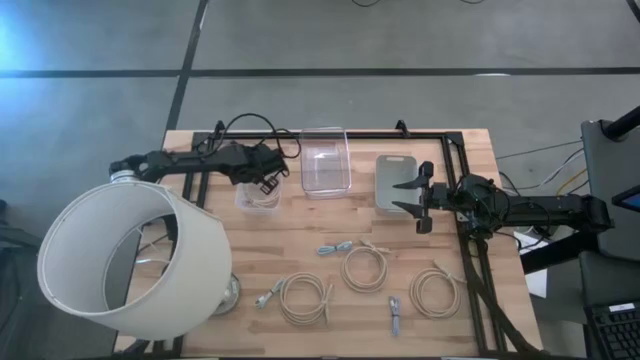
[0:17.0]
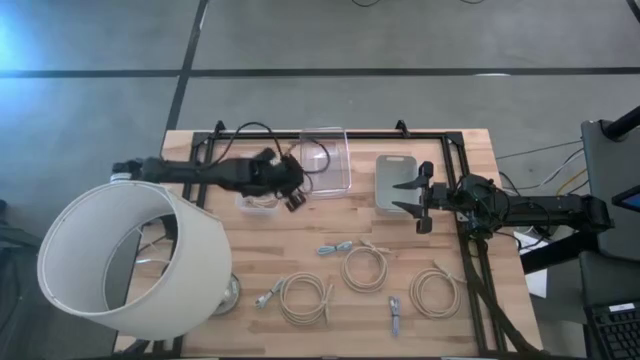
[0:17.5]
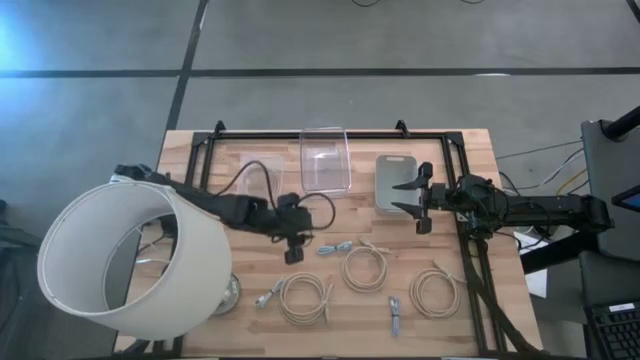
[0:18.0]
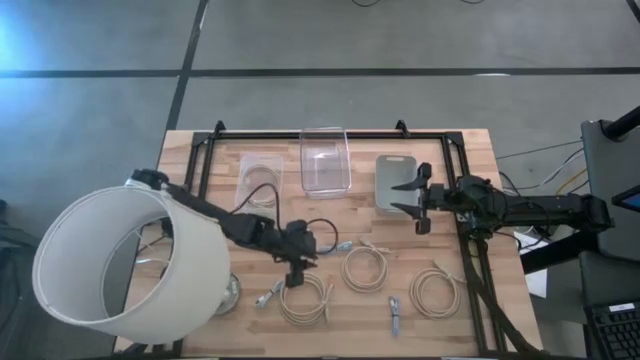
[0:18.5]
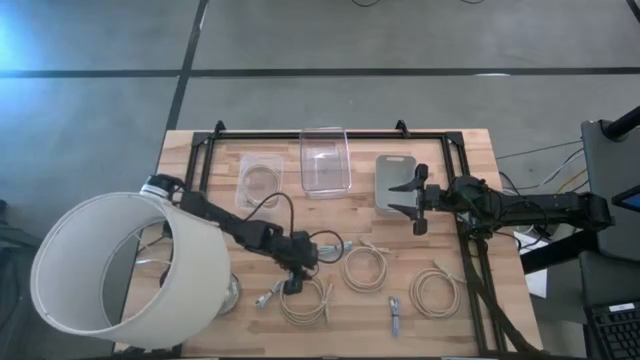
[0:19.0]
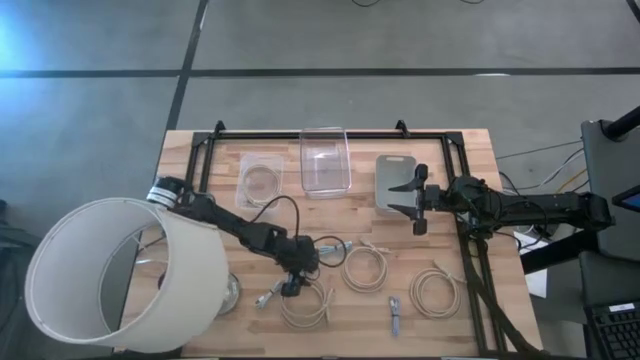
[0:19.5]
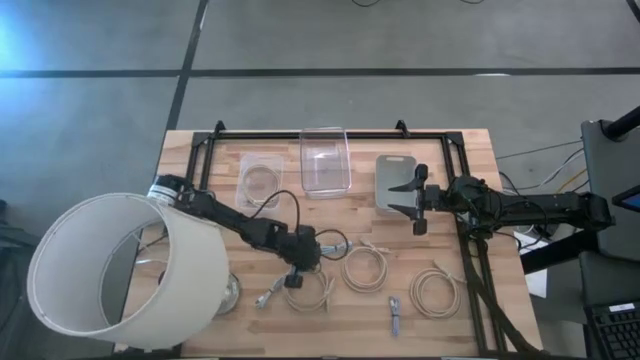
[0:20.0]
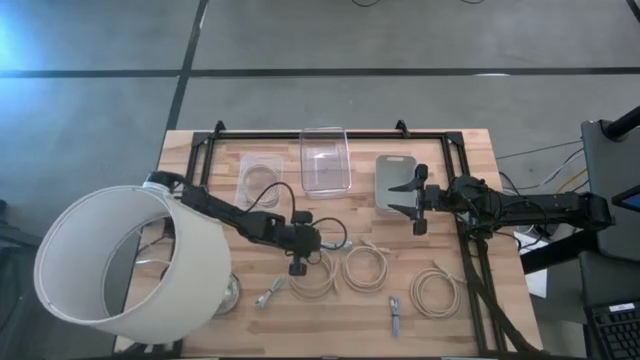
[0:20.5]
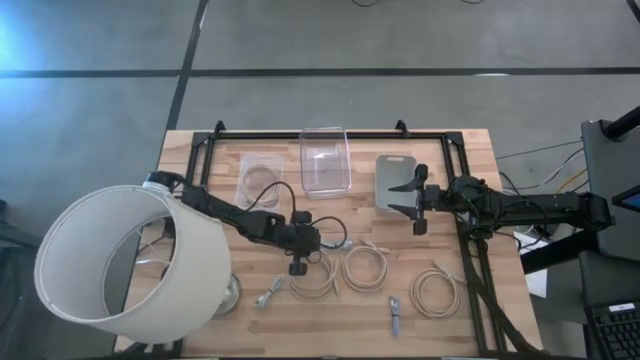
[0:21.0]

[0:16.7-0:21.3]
Task: Pick & Place USB Port
Put the brown USB cable into the white transparent bin

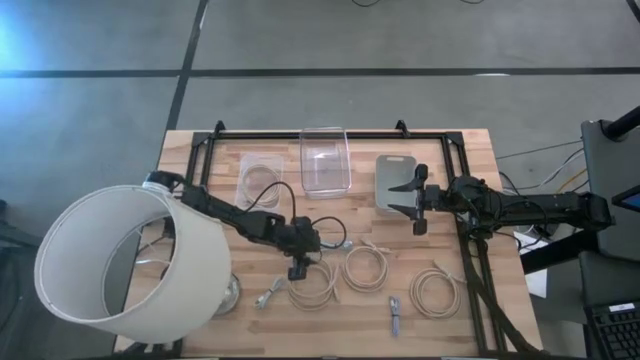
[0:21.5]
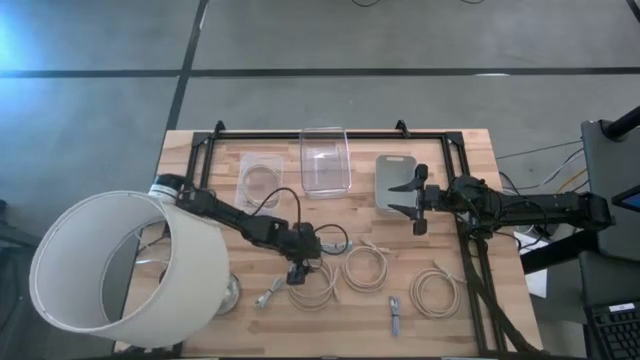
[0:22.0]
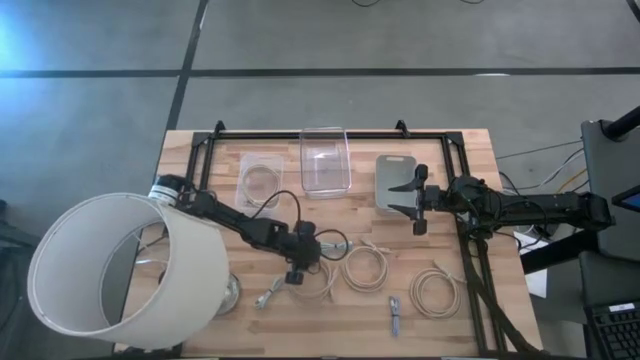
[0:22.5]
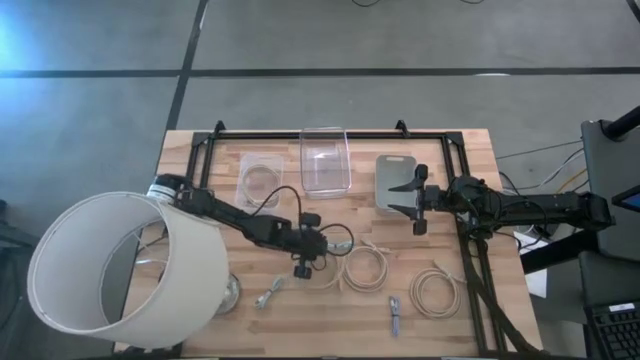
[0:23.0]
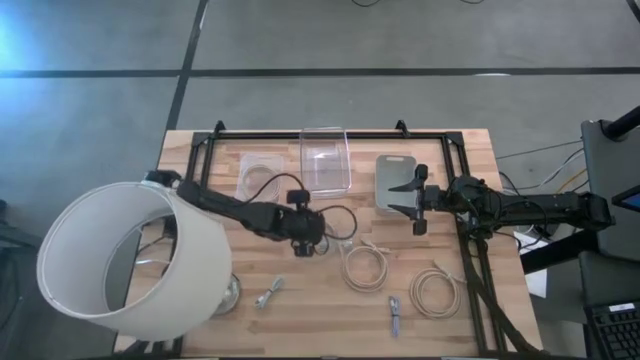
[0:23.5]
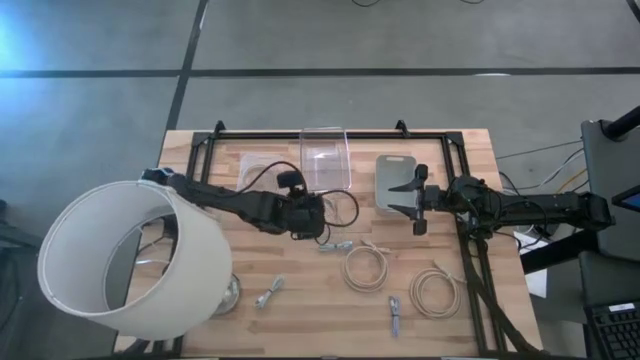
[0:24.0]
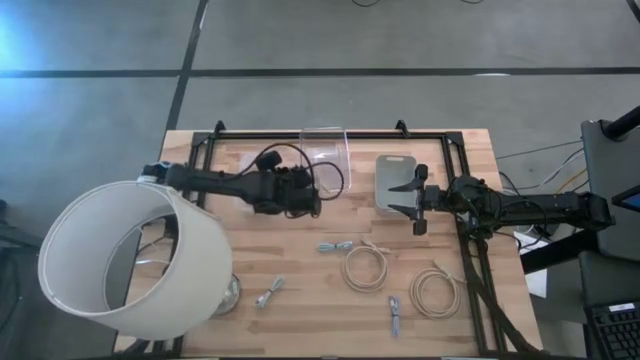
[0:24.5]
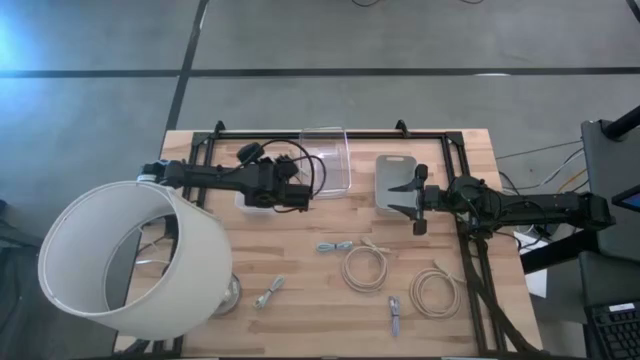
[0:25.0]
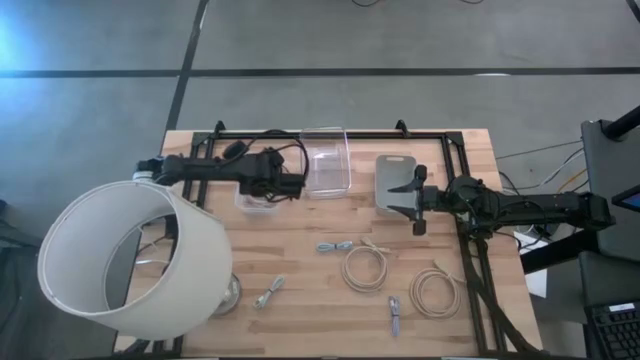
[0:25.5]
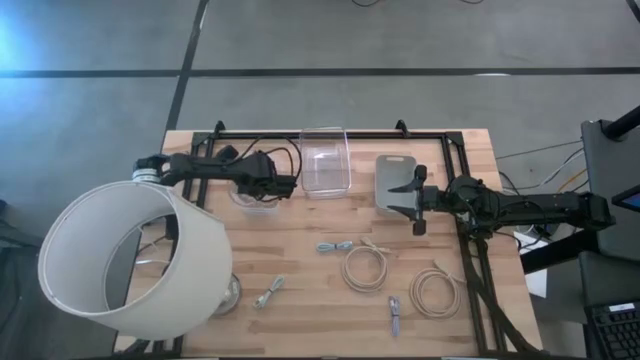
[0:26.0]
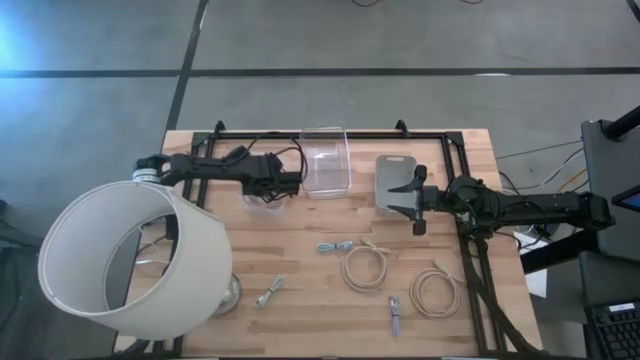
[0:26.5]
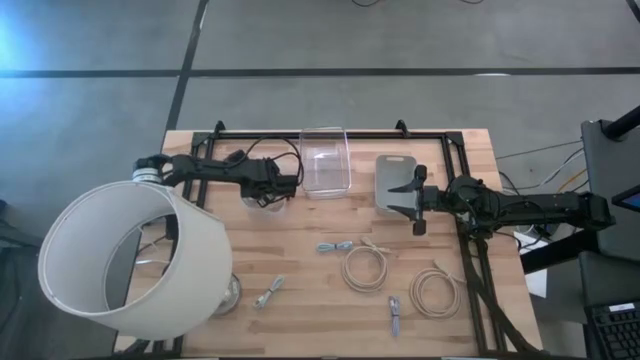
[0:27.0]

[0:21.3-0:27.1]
Put the brown USB cable into the white transparent bin

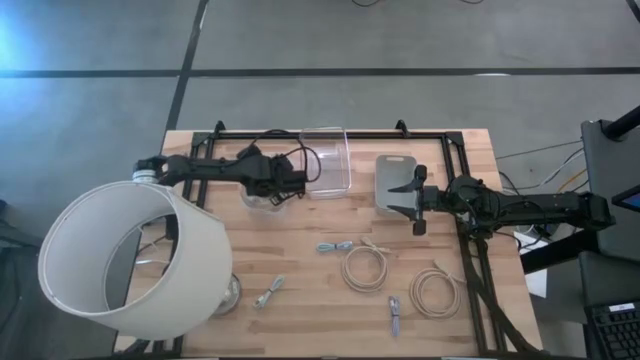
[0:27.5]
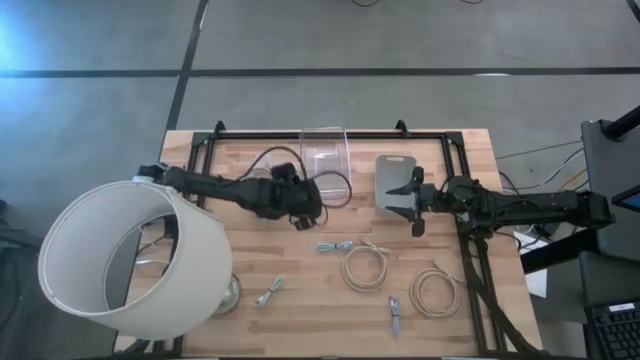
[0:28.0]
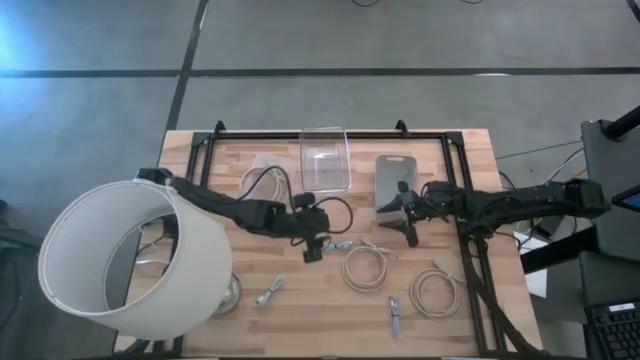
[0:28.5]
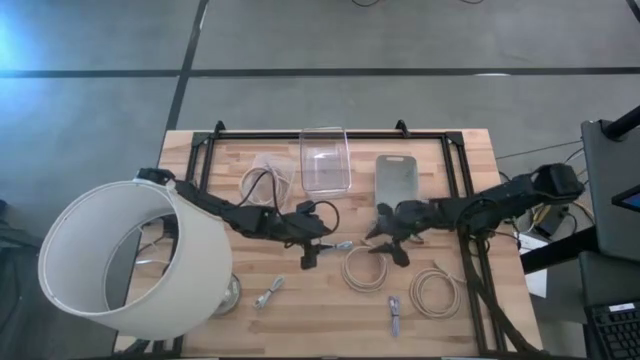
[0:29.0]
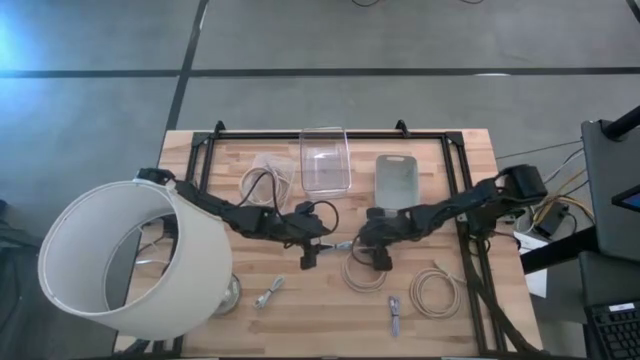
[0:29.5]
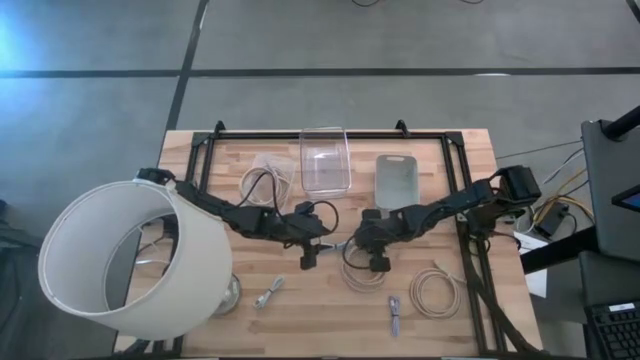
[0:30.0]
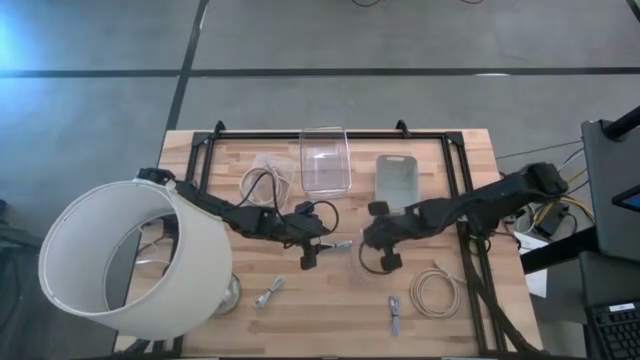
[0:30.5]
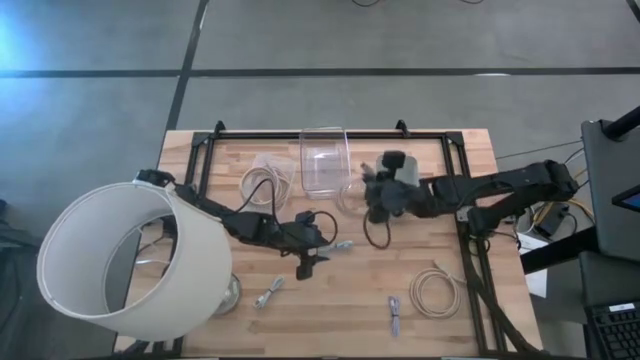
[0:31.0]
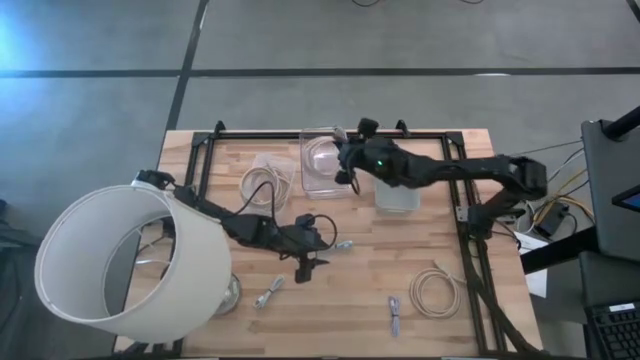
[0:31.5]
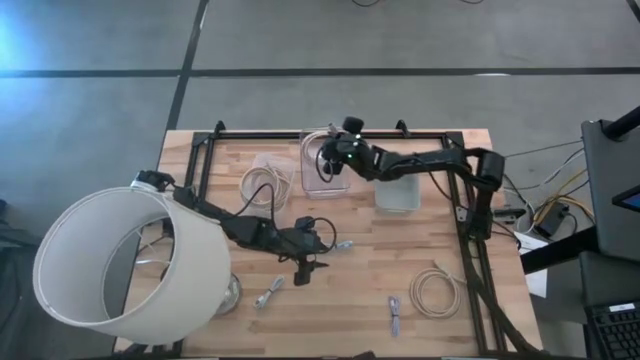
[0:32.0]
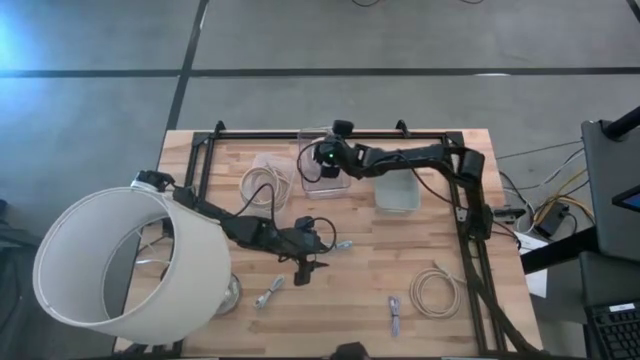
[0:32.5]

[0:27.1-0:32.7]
Put the brown USB cable into the transparent bin

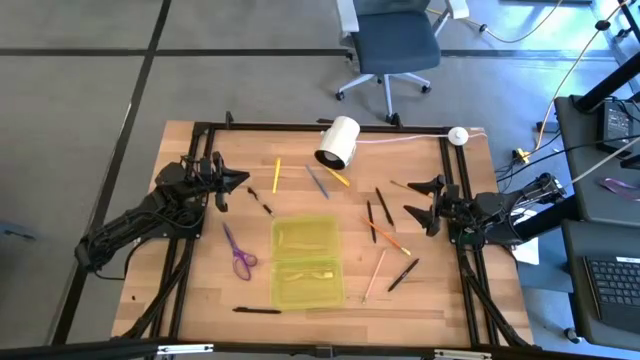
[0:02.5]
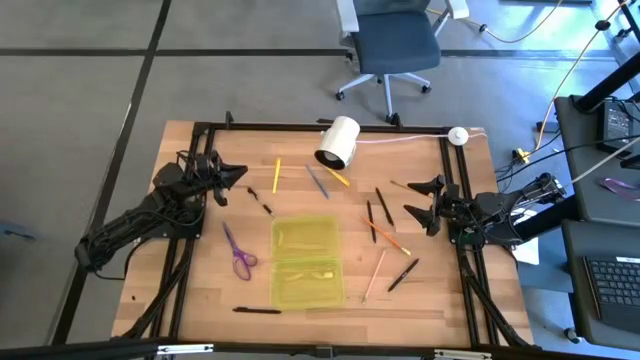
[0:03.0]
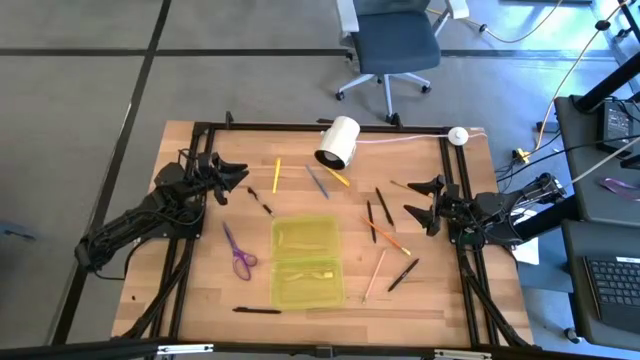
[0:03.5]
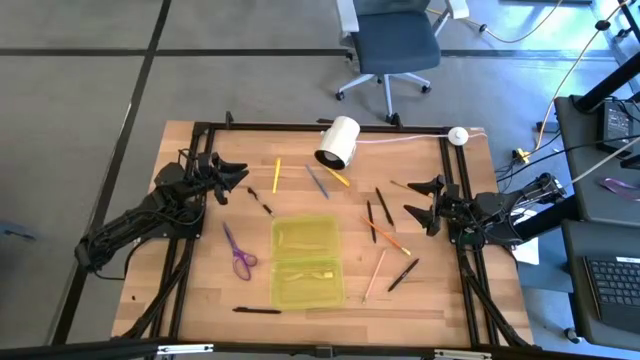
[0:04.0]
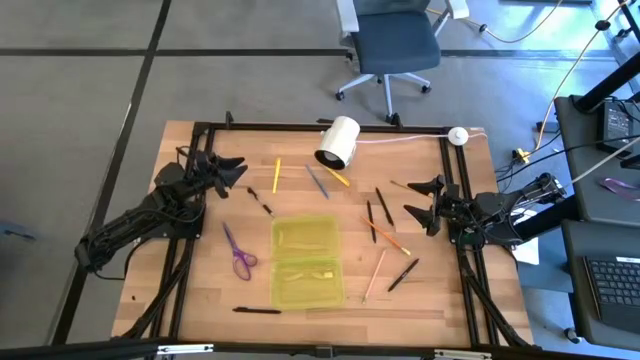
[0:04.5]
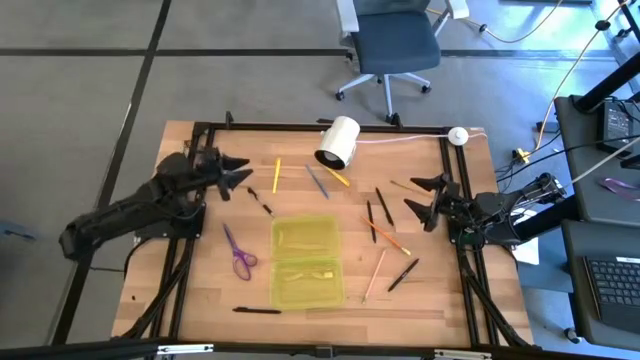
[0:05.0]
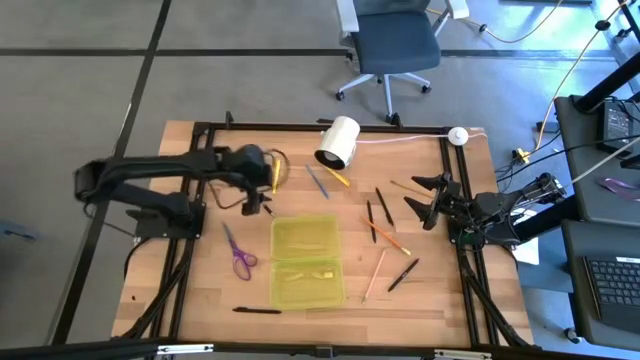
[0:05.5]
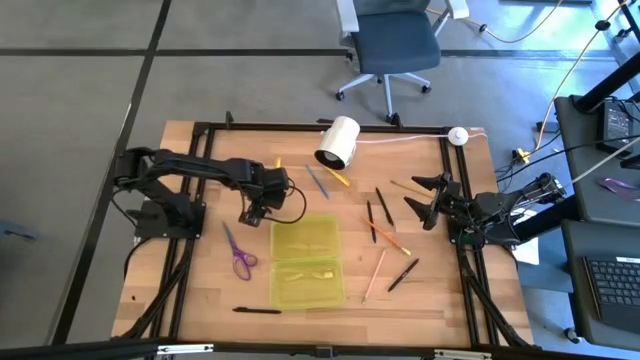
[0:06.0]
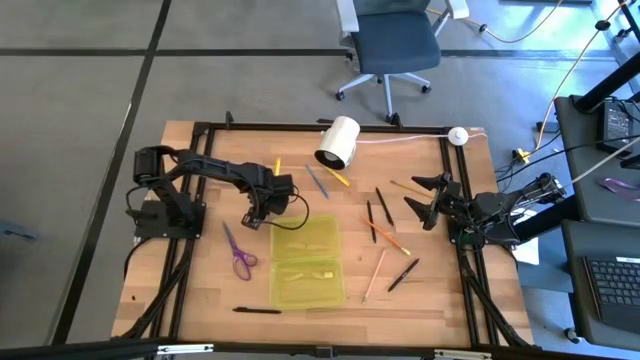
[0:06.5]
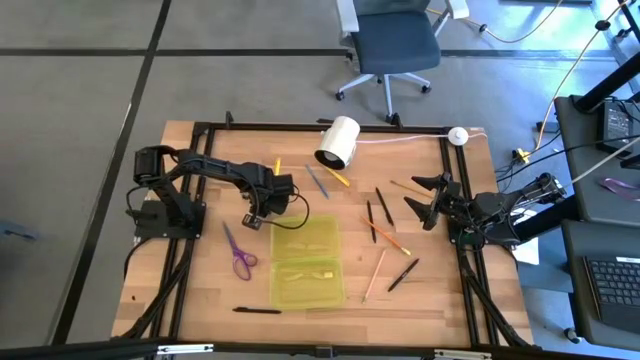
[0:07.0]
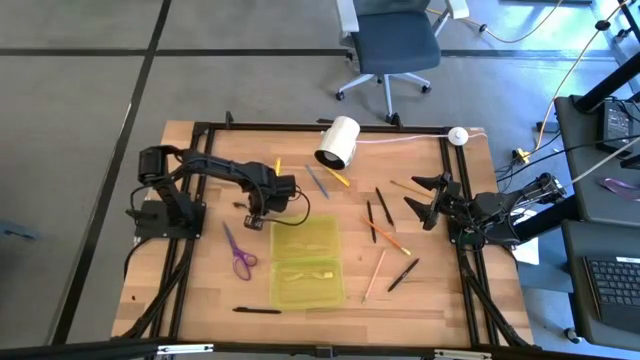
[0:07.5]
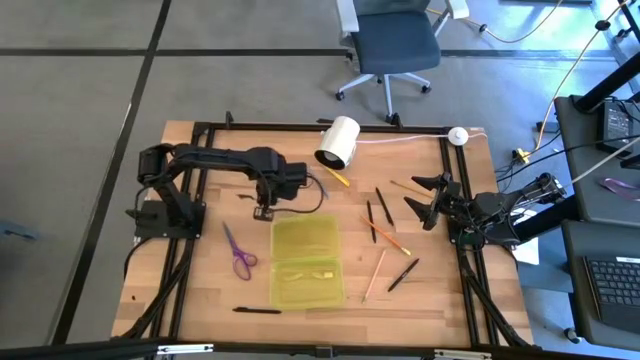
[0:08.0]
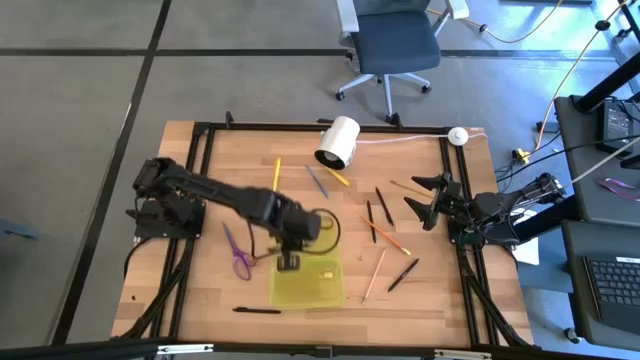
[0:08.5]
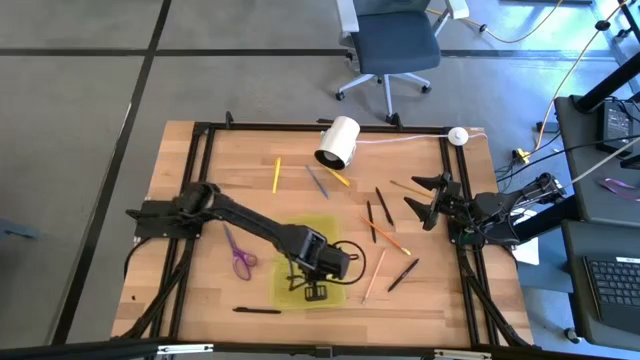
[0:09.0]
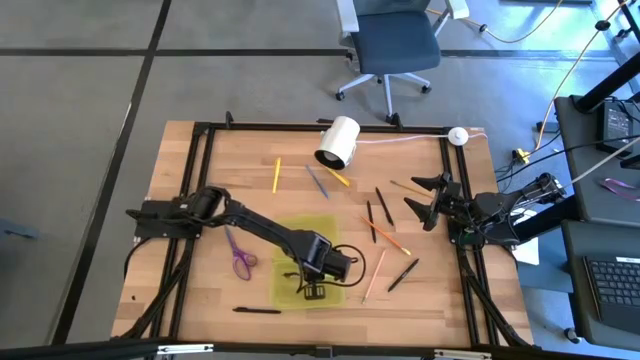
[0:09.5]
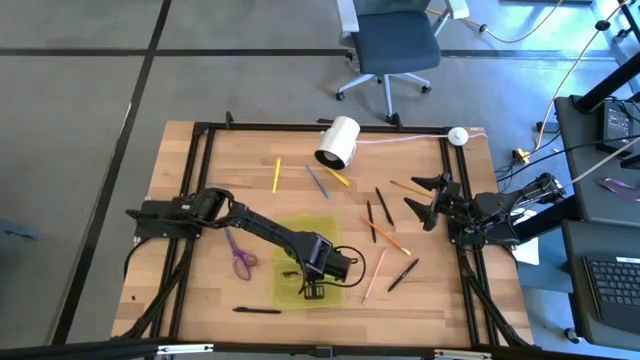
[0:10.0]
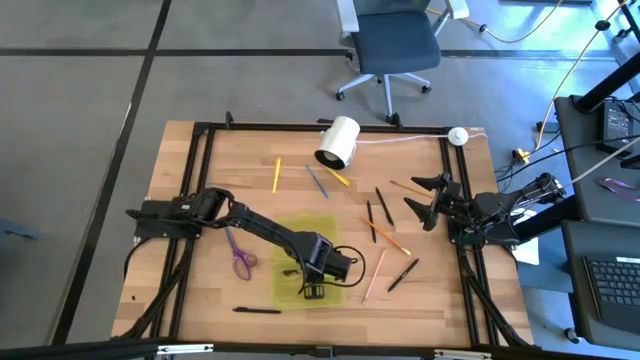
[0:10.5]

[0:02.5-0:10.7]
Task: Pick & place school supplies into a supply box
Put the black pen into the yellow supply box
